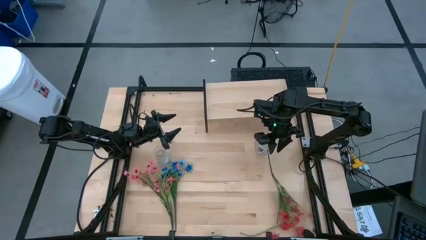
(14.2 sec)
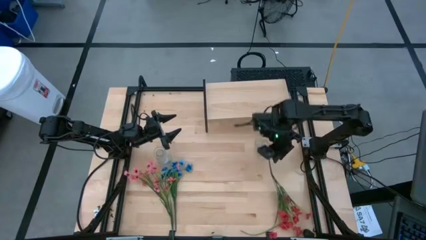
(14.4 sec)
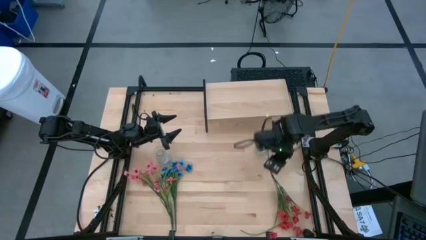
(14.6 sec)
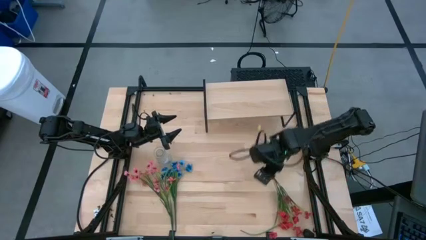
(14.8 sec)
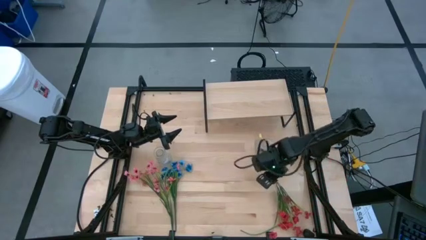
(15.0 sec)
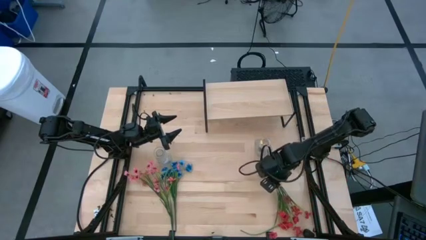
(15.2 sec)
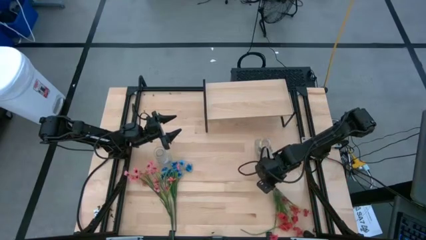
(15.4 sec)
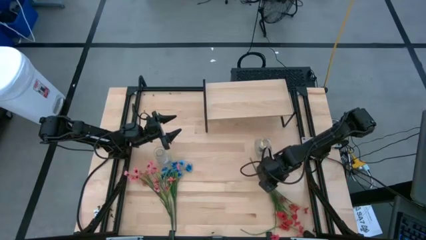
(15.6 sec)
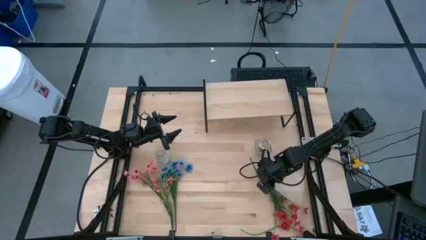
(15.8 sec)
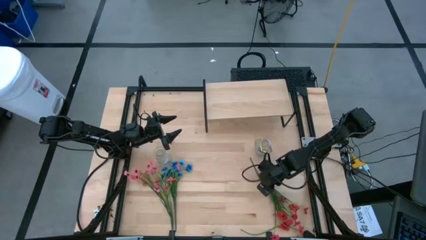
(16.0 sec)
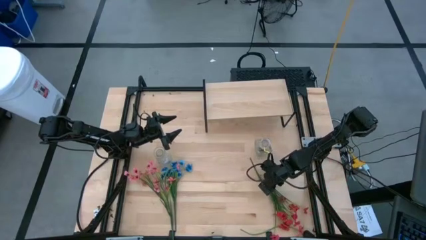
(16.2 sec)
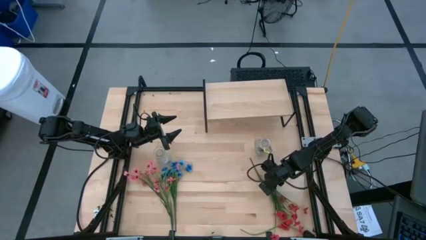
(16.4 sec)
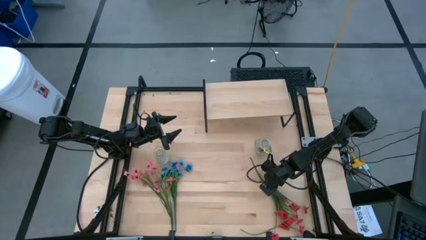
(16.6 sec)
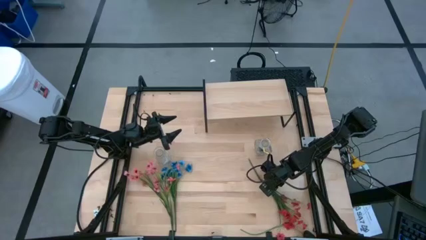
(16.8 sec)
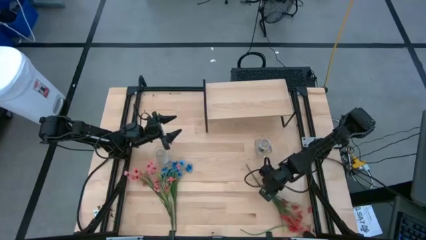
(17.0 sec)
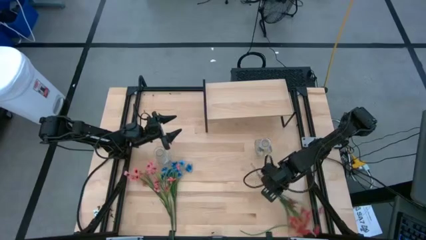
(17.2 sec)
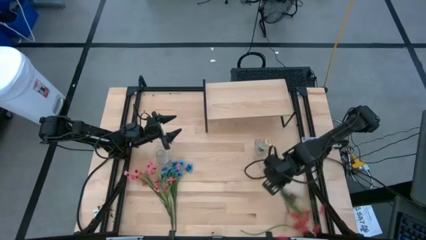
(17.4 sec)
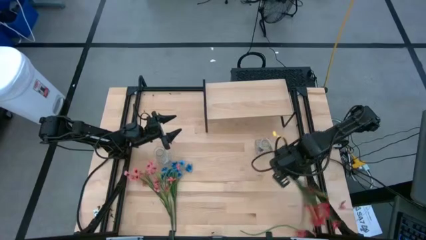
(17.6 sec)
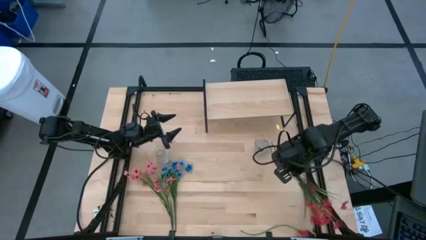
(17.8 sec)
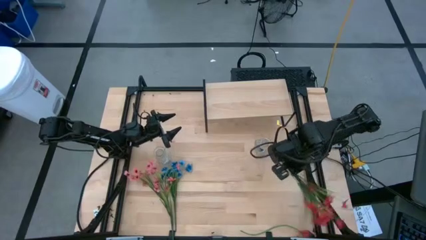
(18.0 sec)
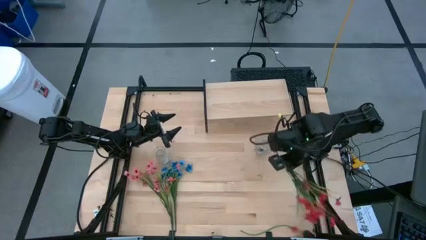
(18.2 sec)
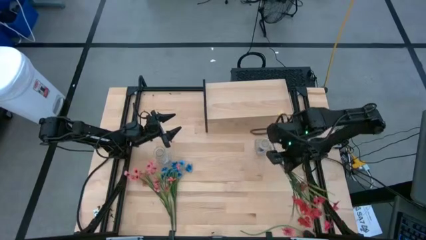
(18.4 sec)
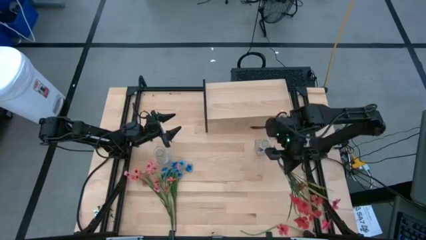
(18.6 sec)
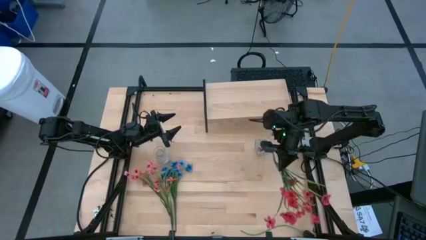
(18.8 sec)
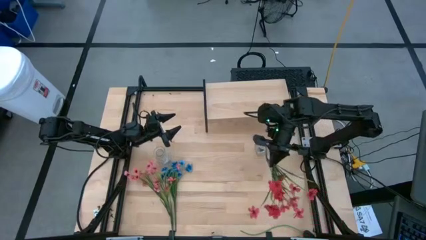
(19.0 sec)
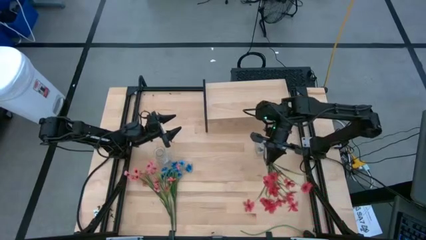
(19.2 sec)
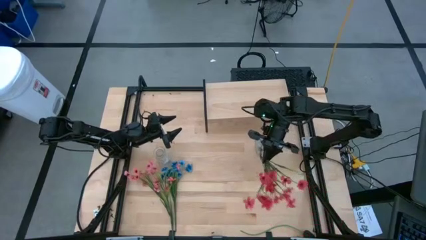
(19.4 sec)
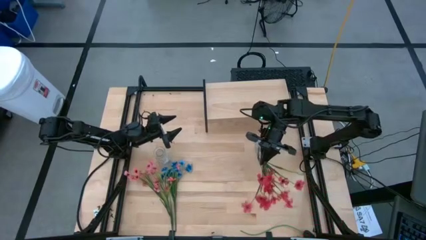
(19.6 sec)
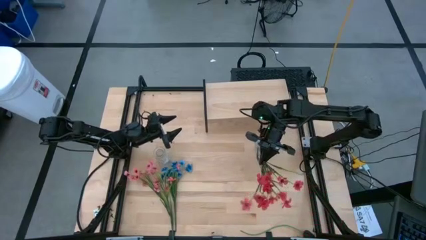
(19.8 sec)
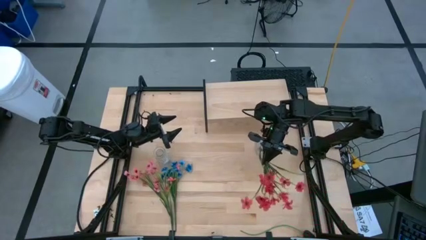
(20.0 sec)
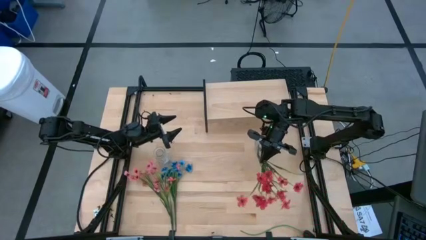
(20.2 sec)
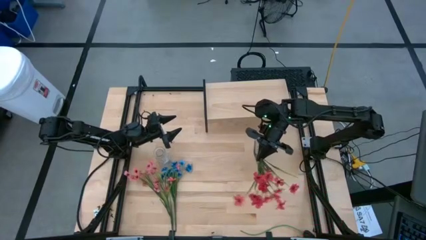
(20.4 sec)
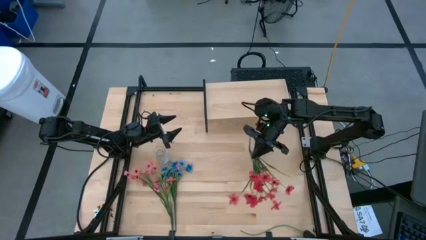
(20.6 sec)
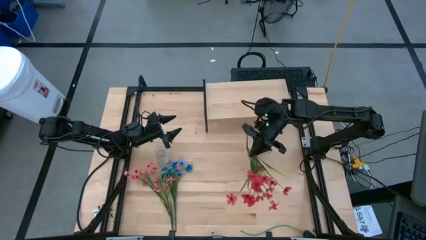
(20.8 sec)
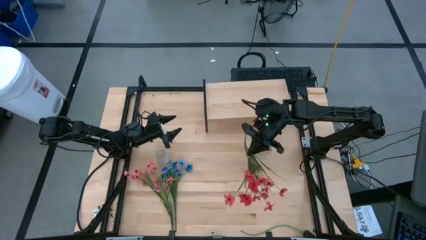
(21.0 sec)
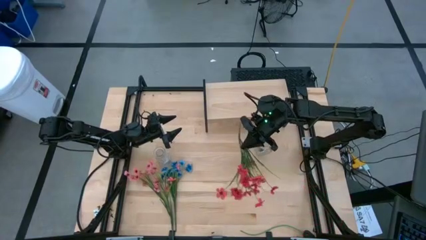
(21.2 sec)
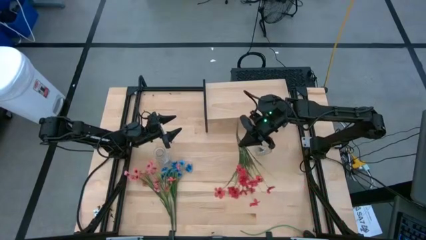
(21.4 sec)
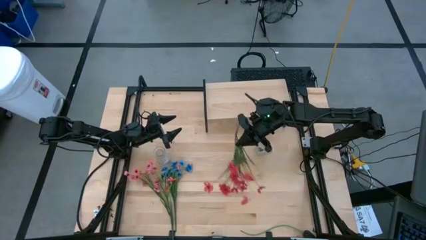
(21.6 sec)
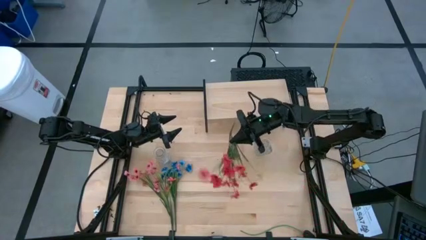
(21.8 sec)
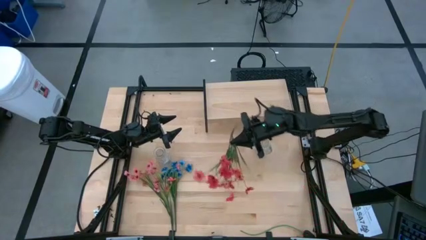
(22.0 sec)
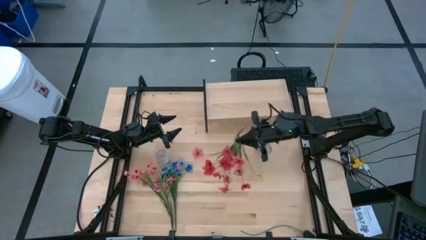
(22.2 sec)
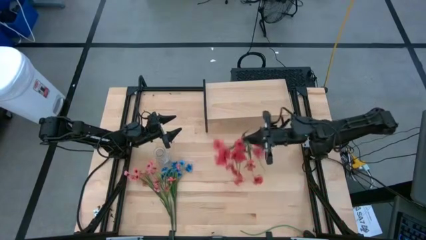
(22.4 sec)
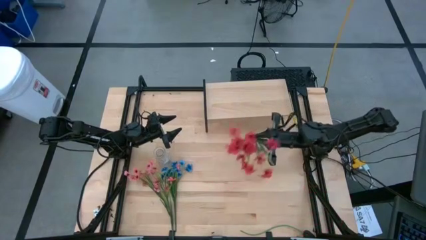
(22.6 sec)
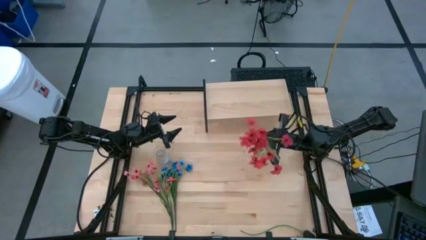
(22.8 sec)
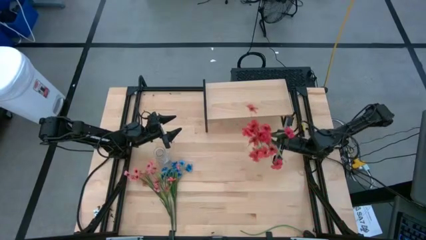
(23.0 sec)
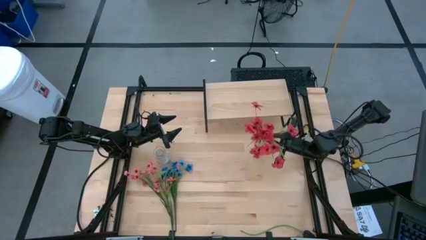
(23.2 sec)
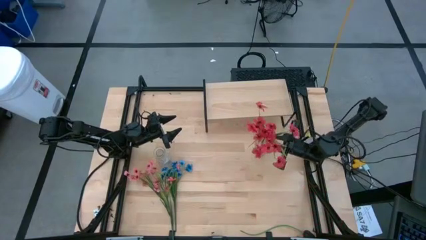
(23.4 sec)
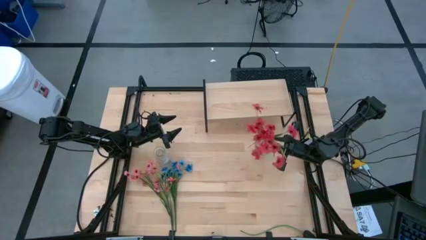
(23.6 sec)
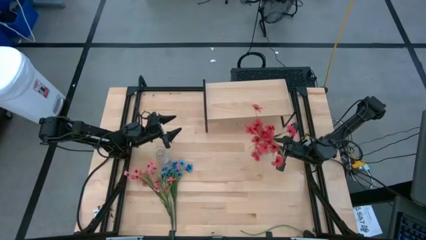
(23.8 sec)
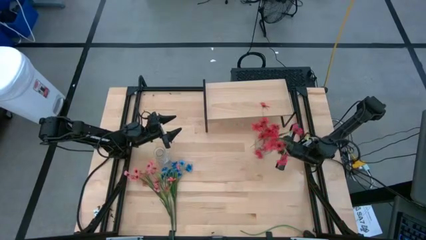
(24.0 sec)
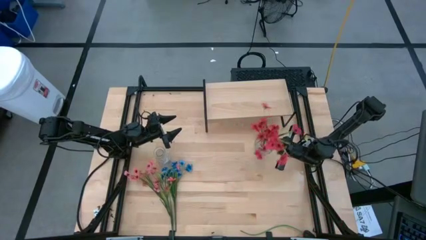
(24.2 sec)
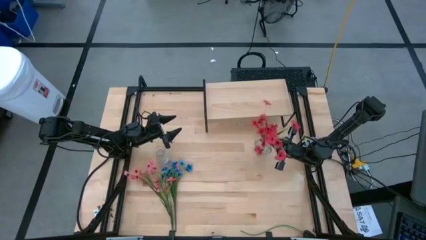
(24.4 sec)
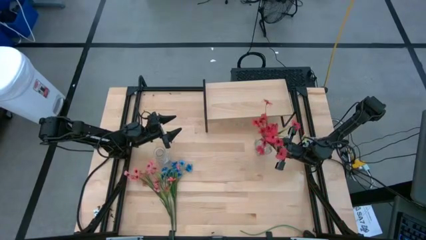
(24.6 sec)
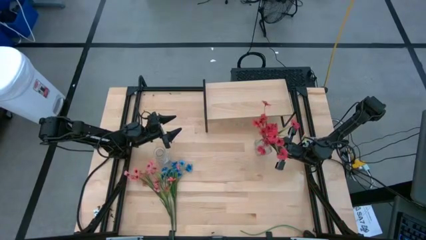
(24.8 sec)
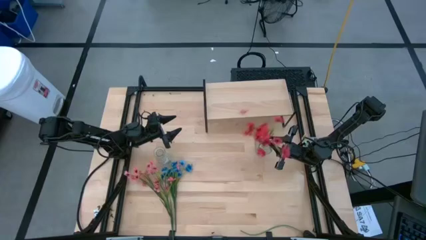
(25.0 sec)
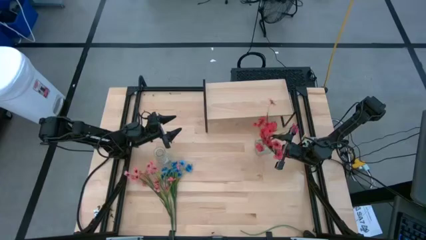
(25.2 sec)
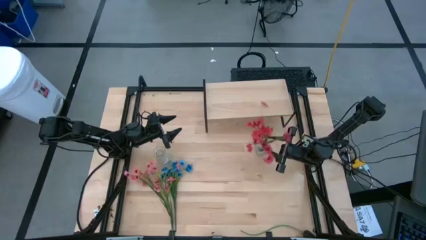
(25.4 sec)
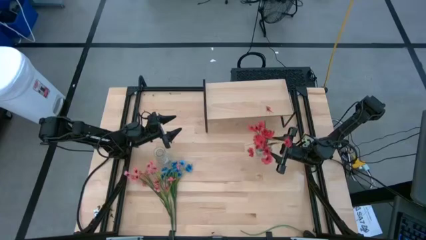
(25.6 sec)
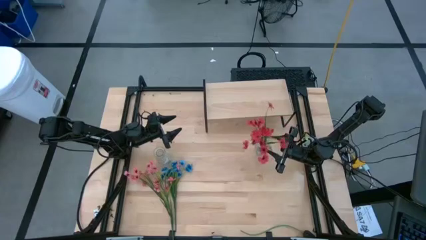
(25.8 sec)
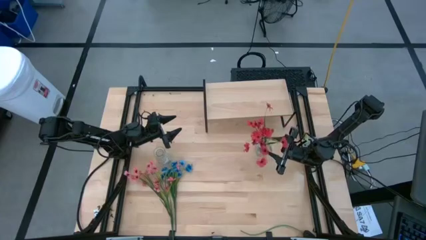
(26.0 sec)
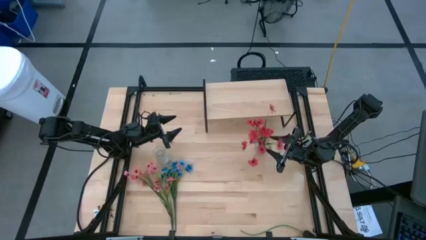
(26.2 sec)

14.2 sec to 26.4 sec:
Task: Pick and place flowers into a vace then onto a shelf
Put the red flowers into the right transparent vase
